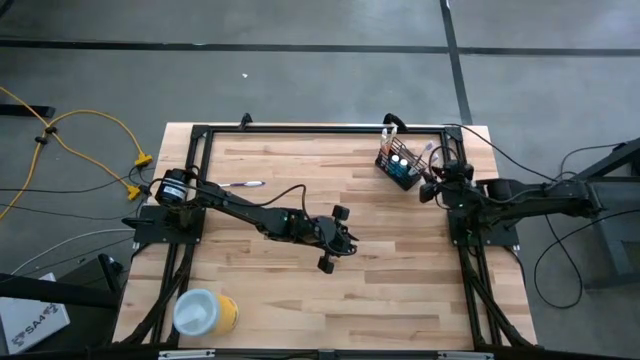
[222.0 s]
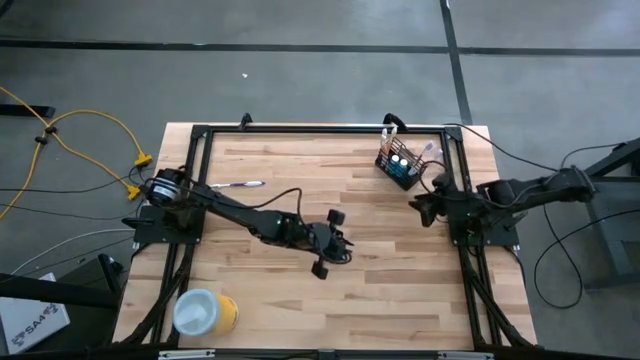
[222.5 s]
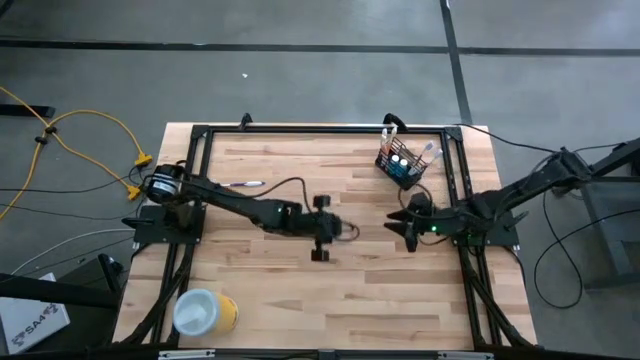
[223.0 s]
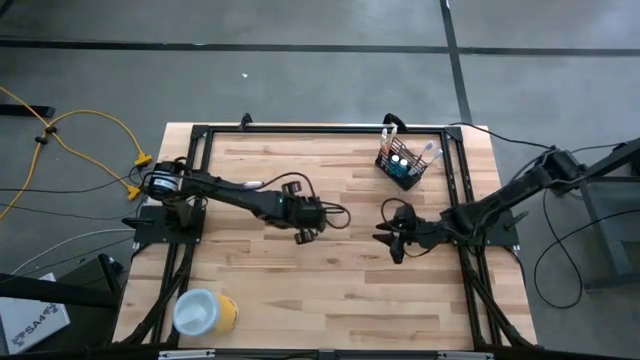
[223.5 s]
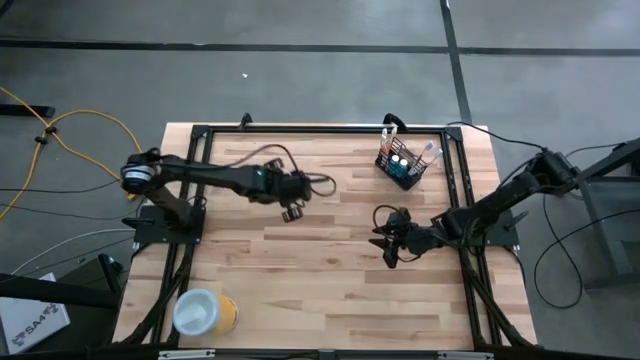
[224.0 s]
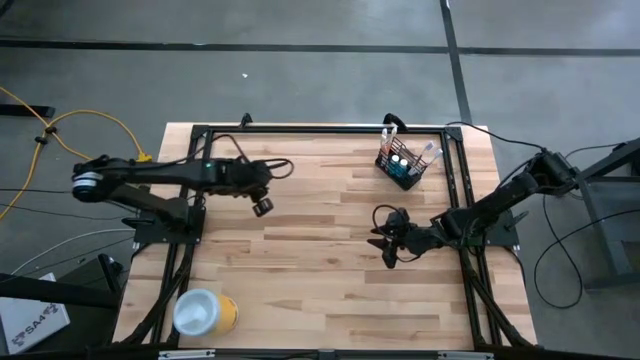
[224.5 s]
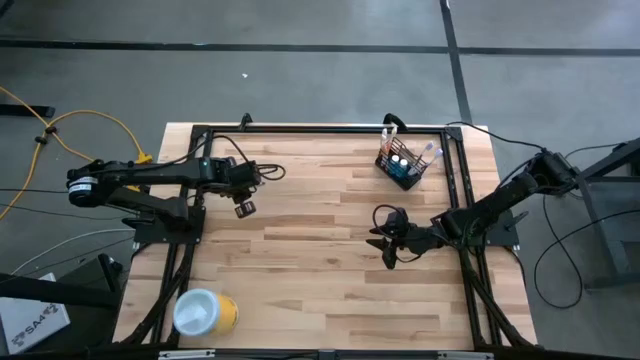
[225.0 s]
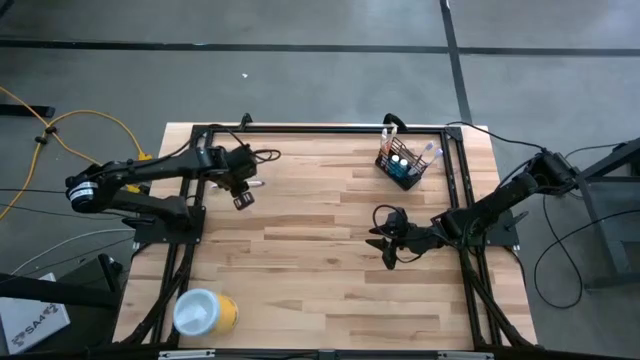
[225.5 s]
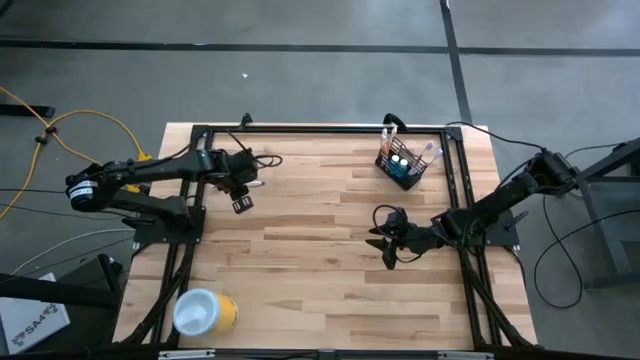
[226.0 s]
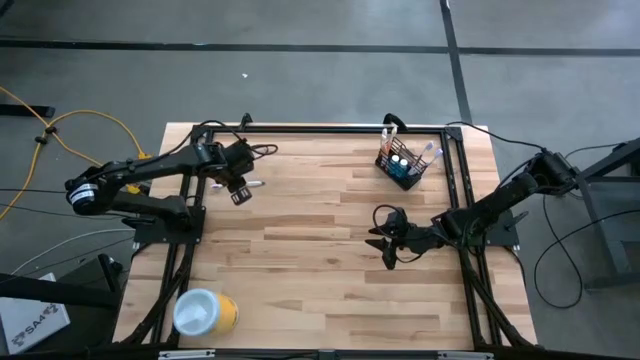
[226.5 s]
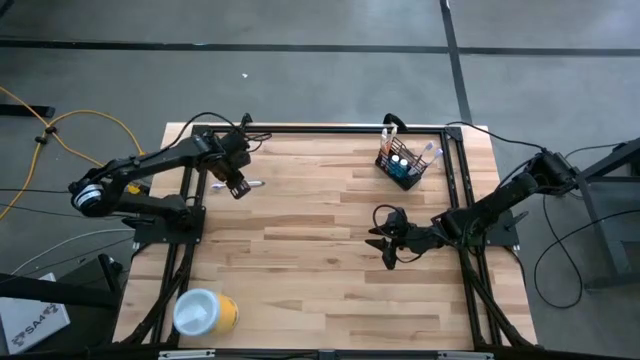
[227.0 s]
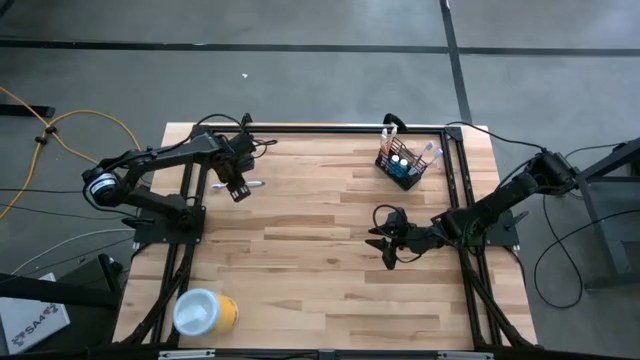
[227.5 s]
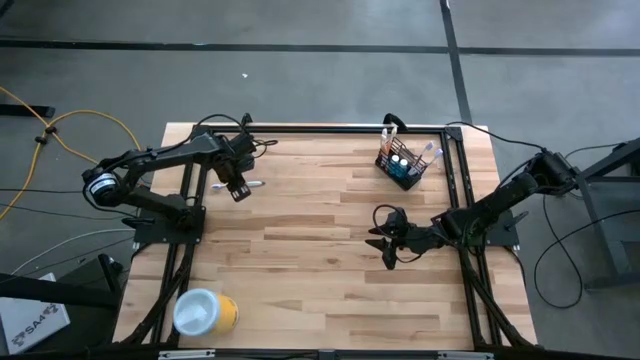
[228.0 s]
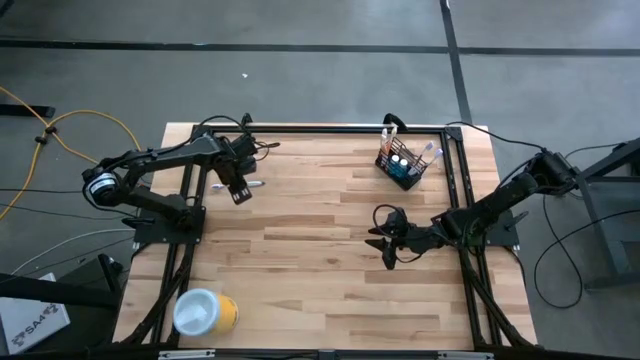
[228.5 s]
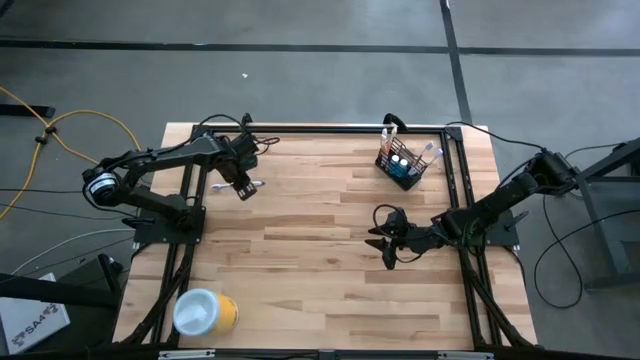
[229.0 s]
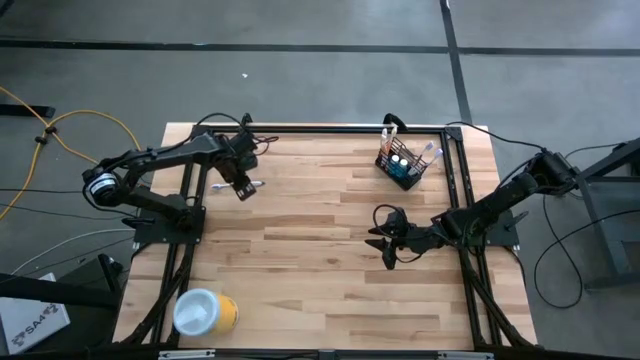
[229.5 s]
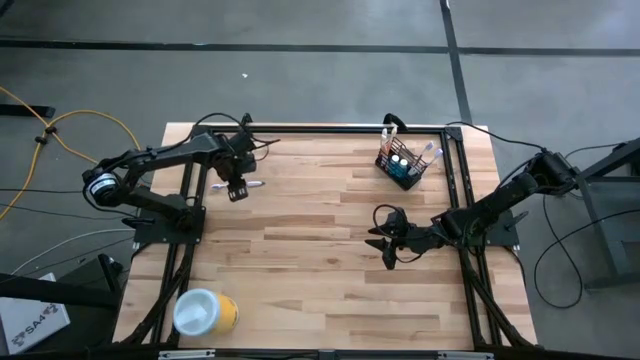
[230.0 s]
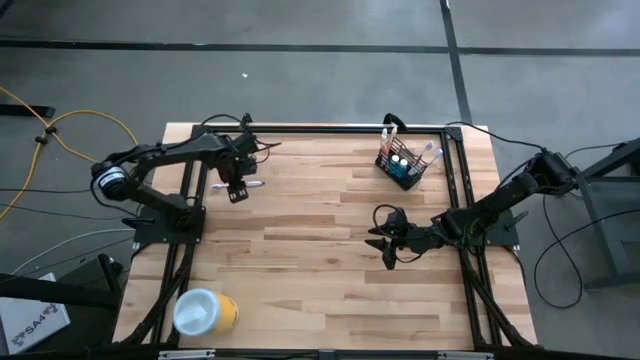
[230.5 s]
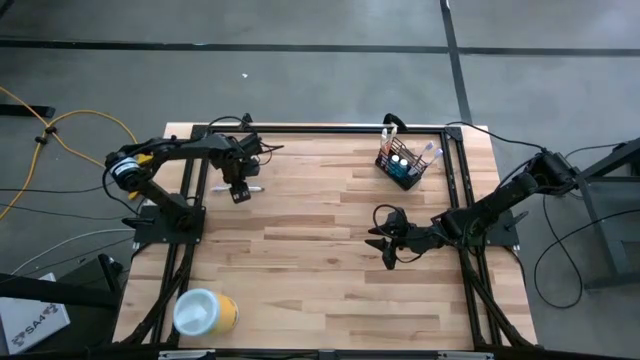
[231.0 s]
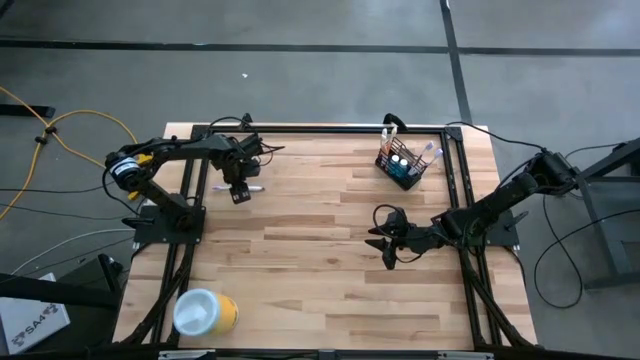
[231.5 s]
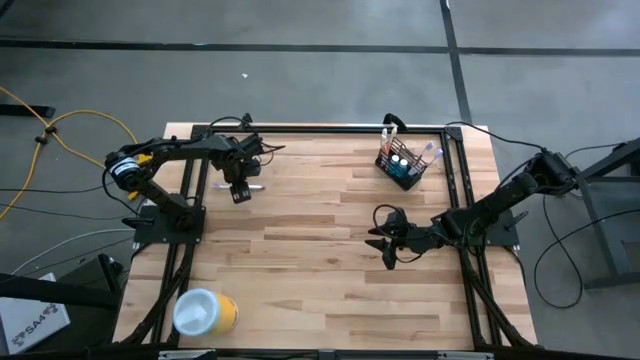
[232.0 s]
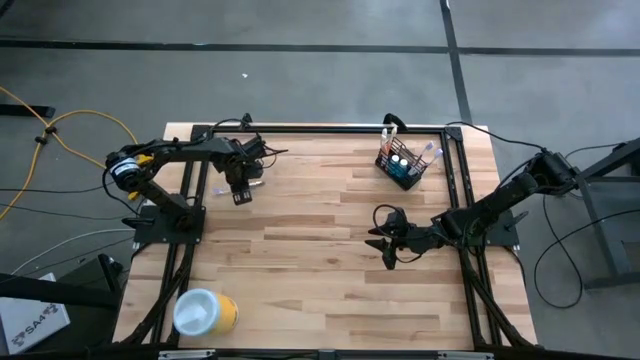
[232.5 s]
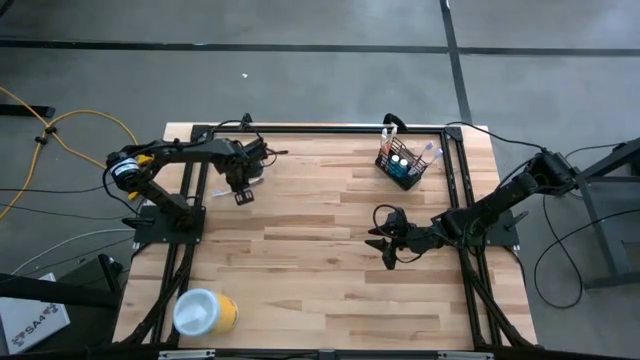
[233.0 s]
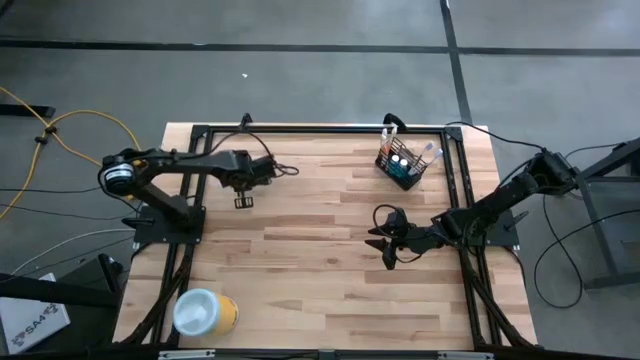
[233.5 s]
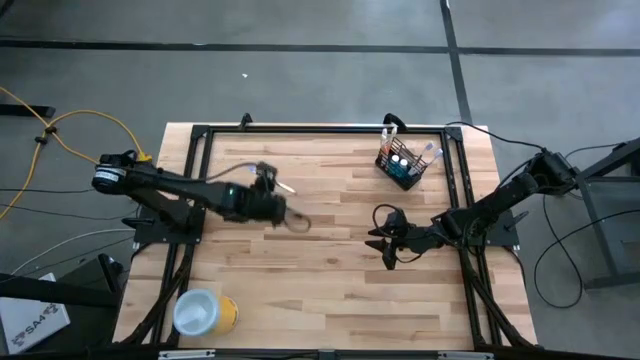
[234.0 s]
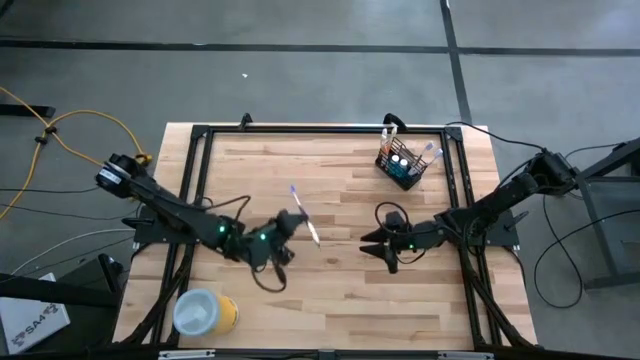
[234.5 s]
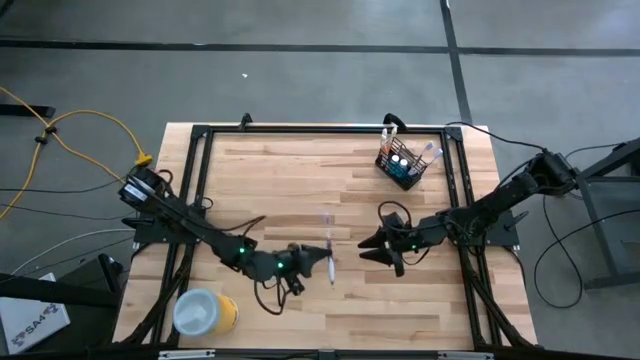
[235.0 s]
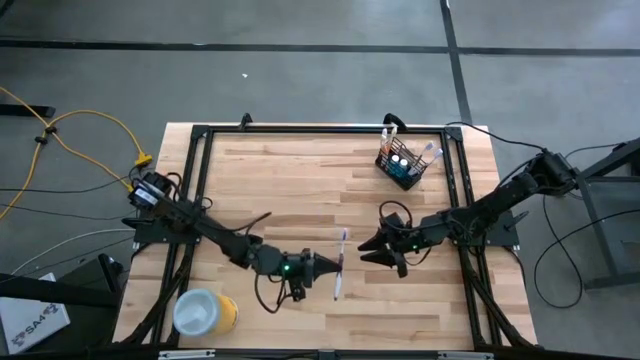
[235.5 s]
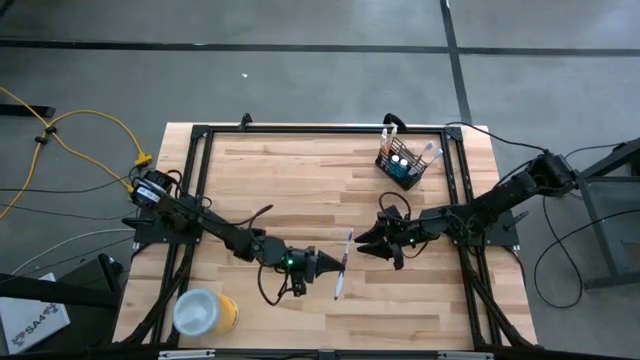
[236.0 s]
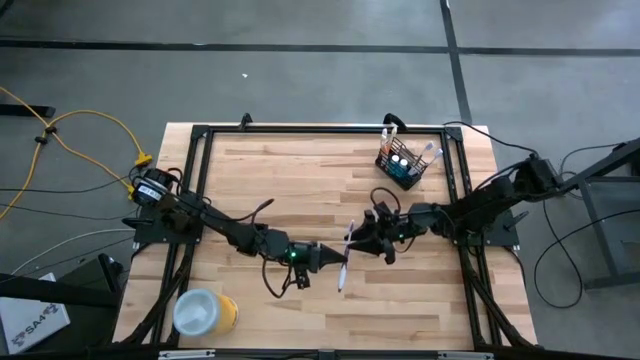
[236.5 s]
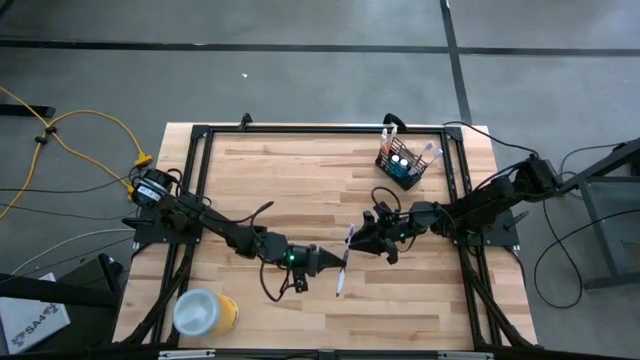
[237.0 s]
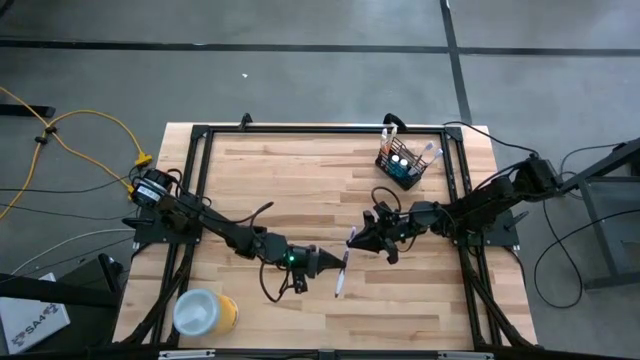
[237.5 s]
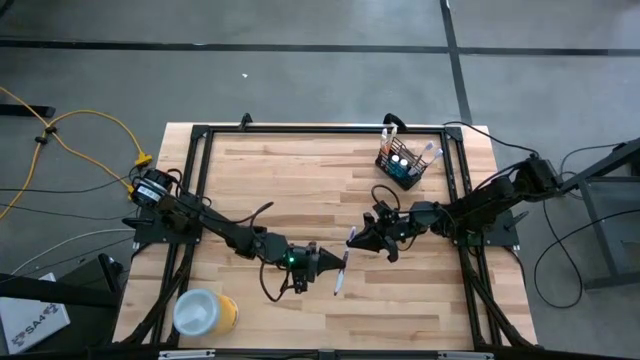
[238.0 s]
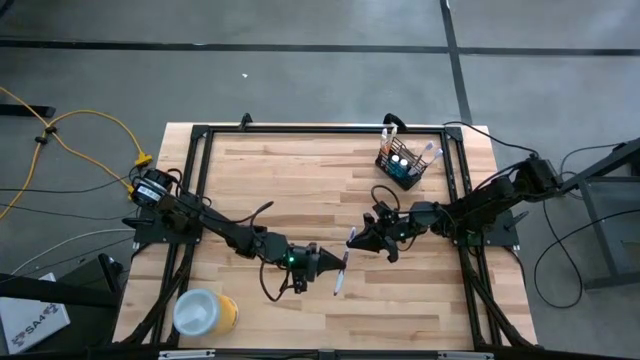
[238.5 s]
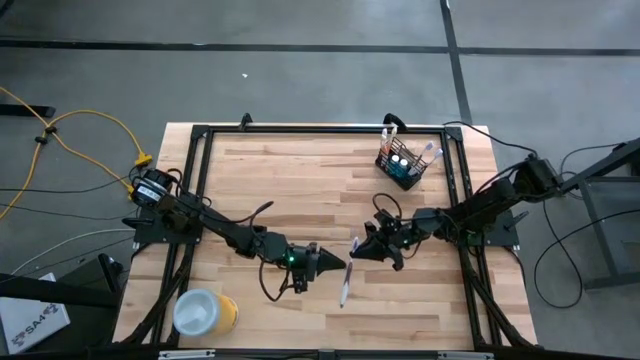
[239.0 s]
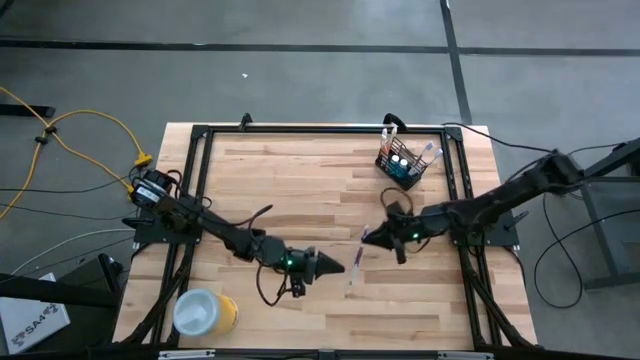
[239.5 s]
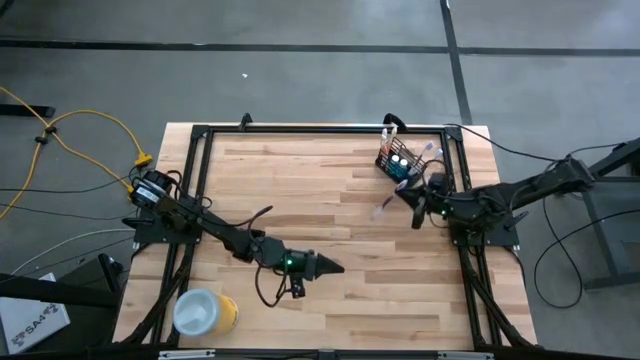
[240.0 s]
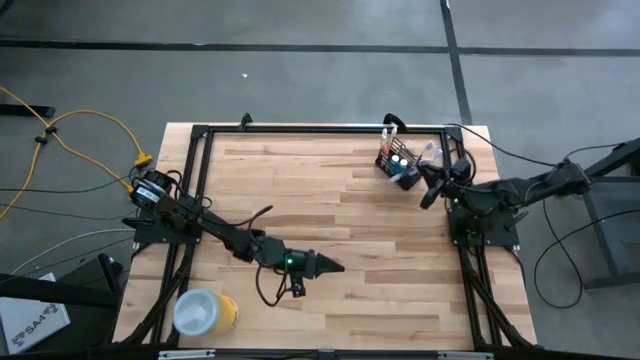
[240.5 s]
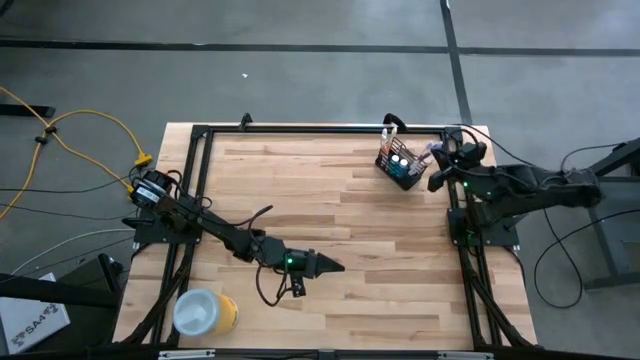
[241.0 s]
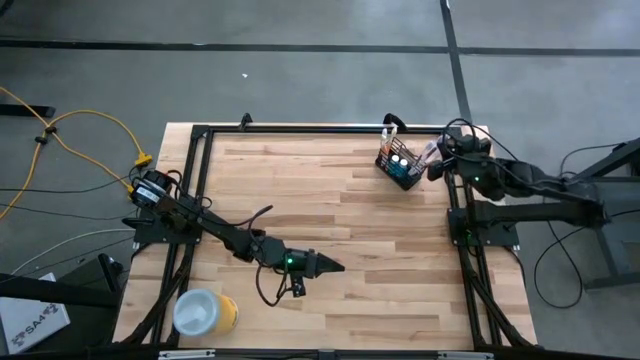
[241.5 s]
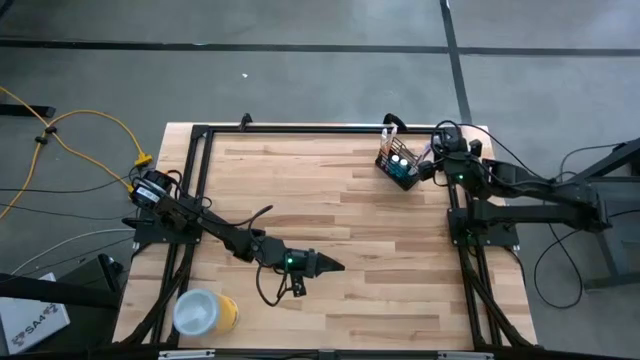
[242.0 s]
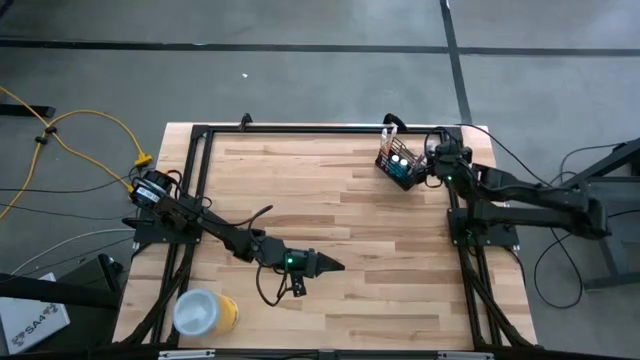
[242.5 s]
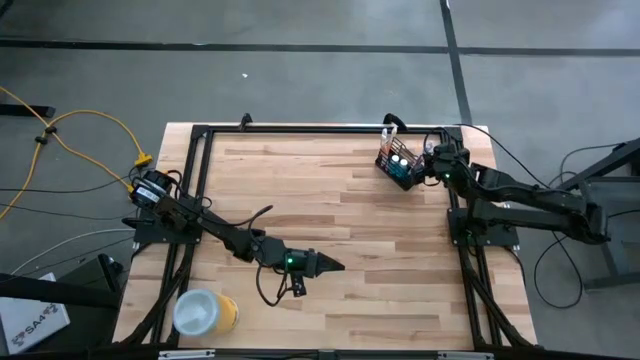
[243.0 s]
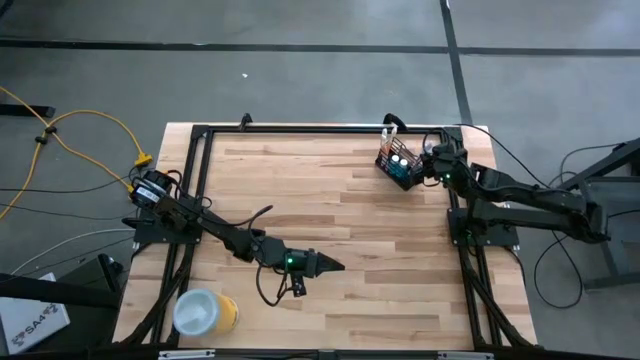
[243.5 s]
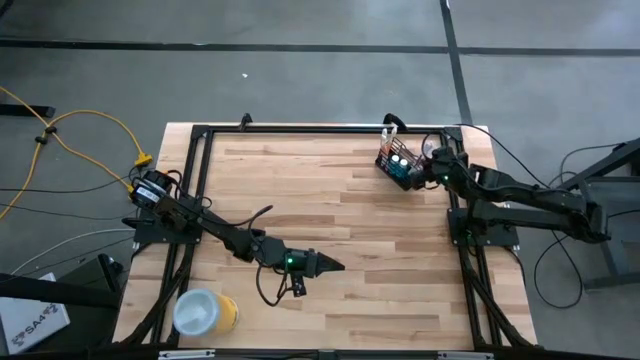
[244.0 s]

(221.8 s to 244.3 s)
Task: Pick & Place toothbrushing station
Put the purple toothbrush into the right of the black mesh organizer
